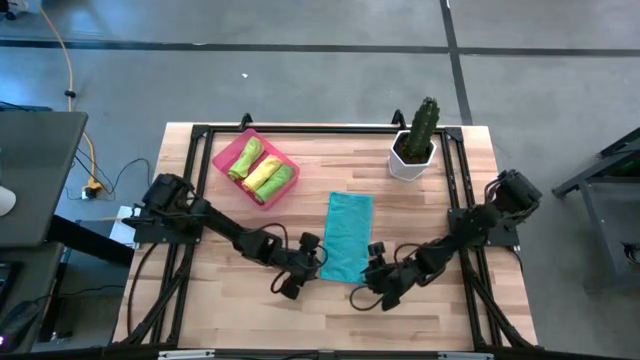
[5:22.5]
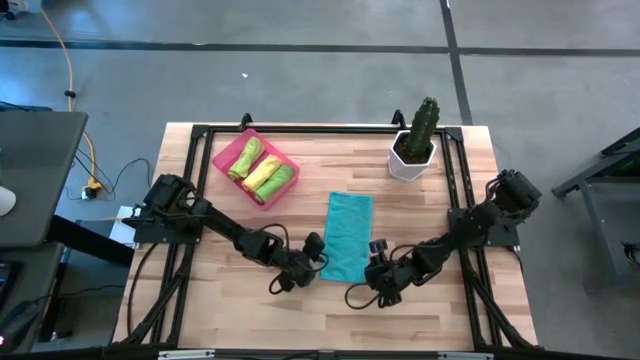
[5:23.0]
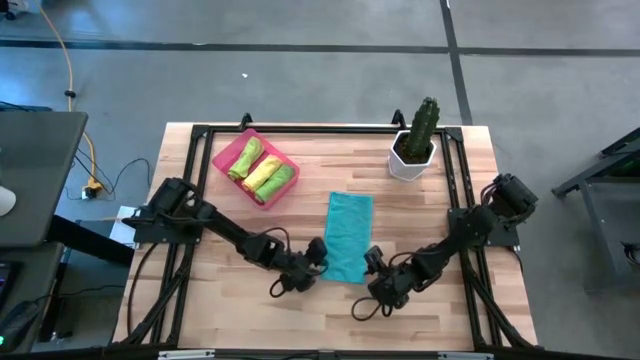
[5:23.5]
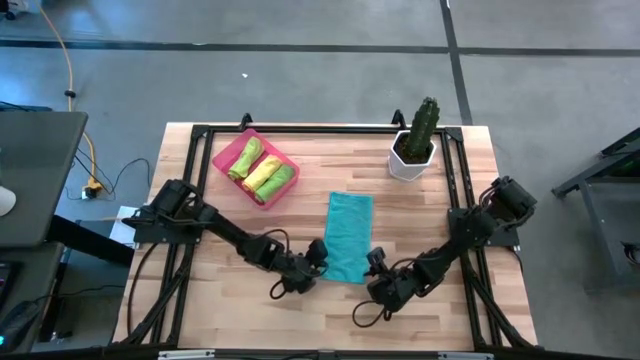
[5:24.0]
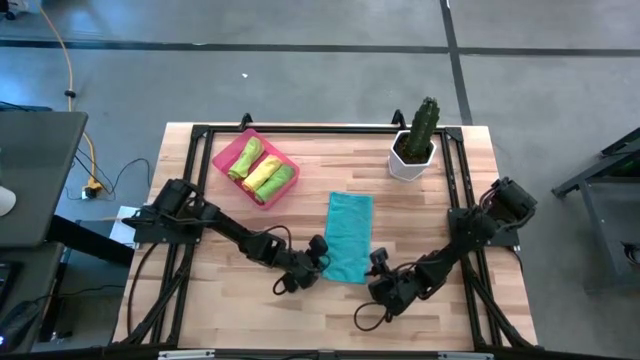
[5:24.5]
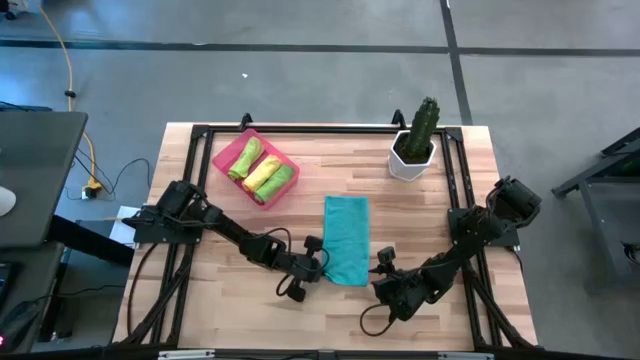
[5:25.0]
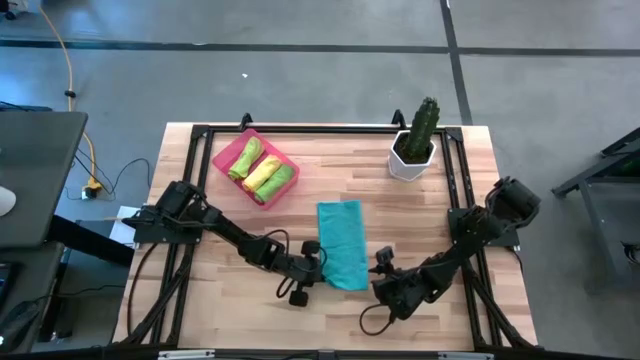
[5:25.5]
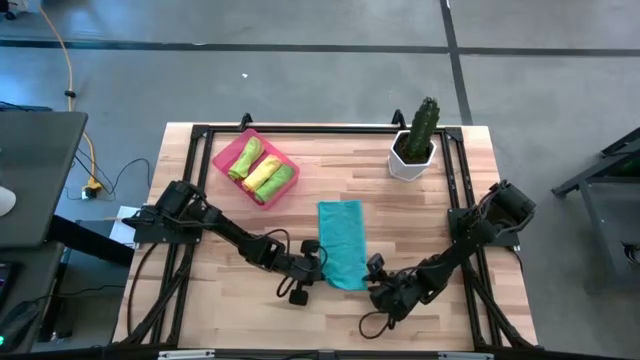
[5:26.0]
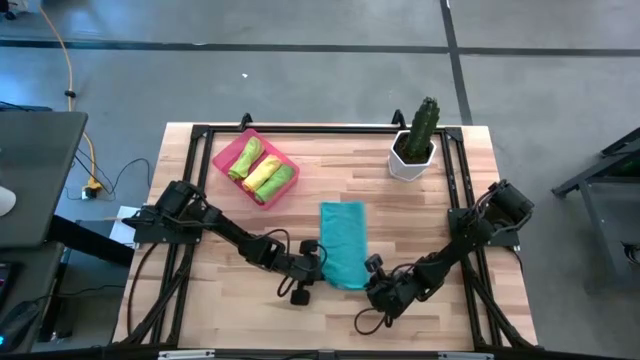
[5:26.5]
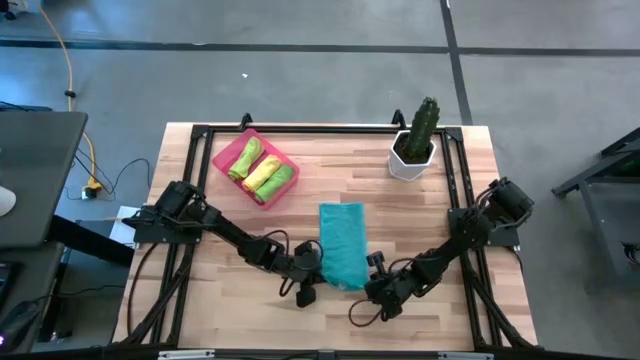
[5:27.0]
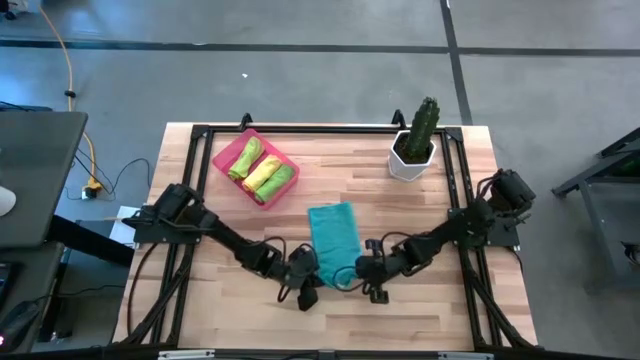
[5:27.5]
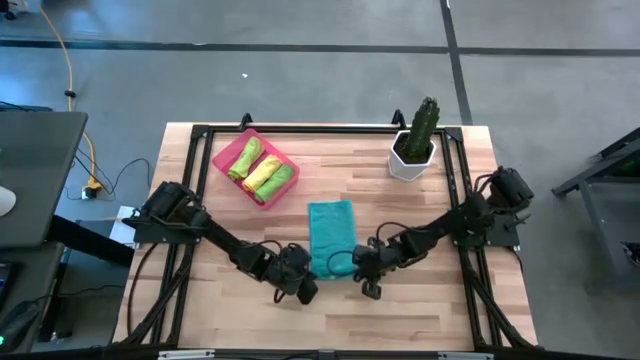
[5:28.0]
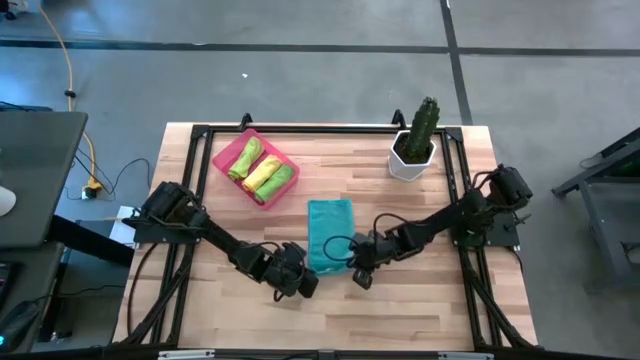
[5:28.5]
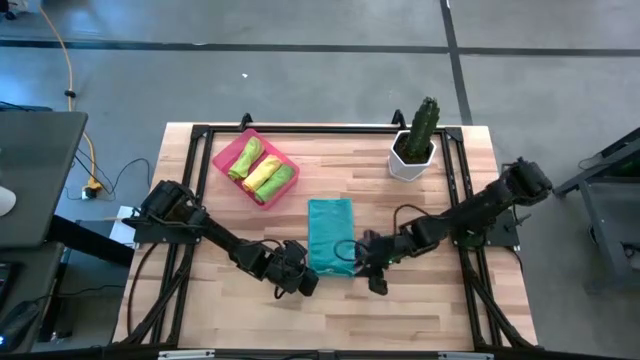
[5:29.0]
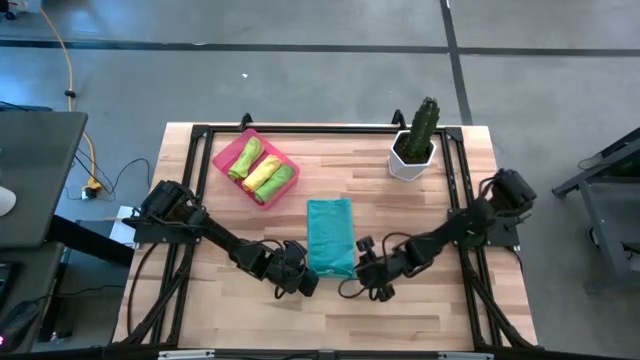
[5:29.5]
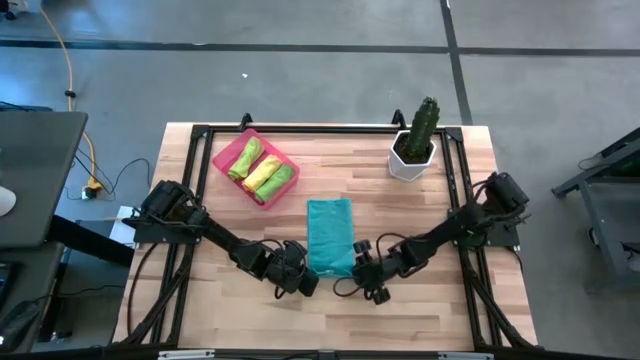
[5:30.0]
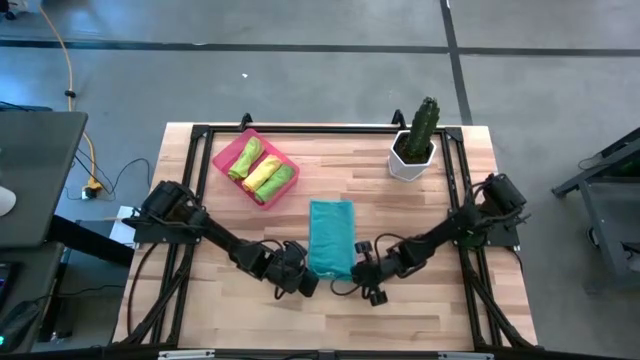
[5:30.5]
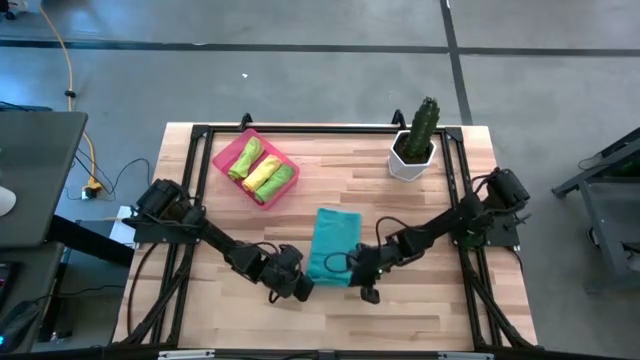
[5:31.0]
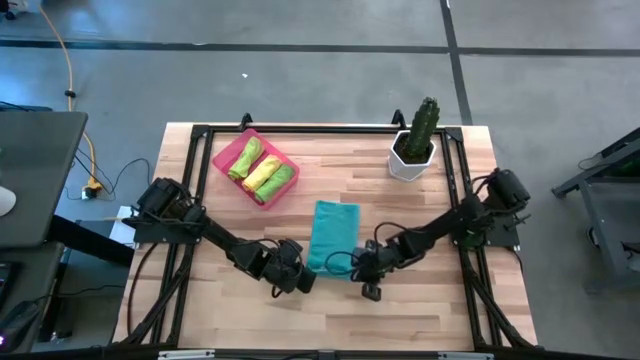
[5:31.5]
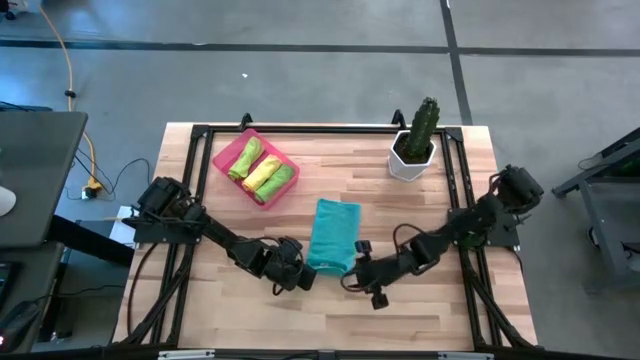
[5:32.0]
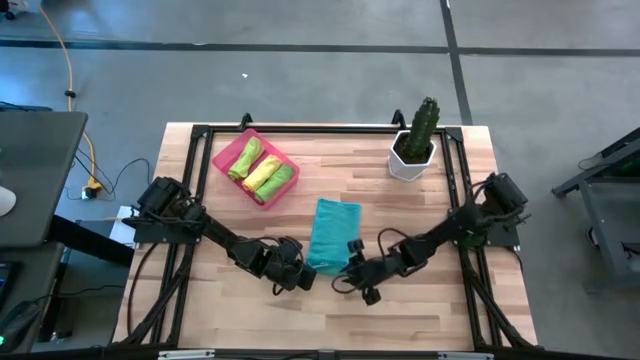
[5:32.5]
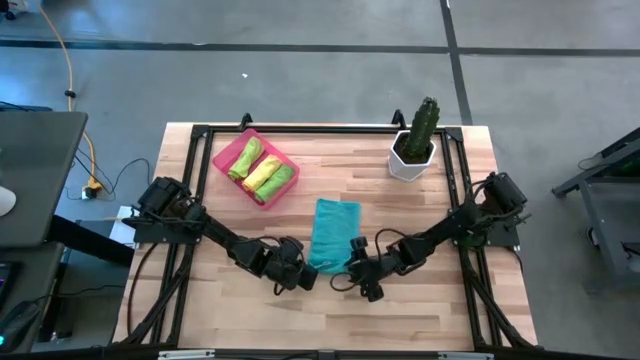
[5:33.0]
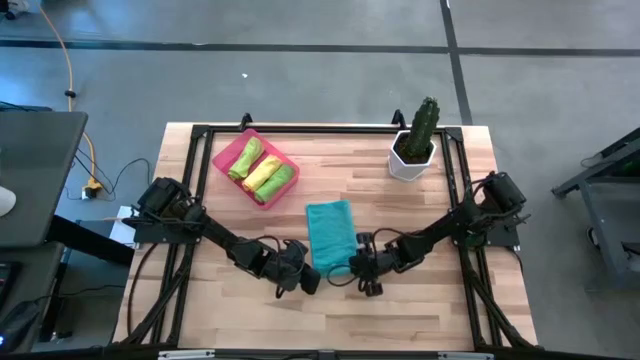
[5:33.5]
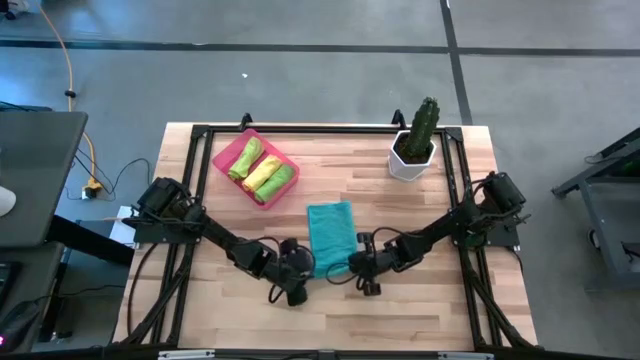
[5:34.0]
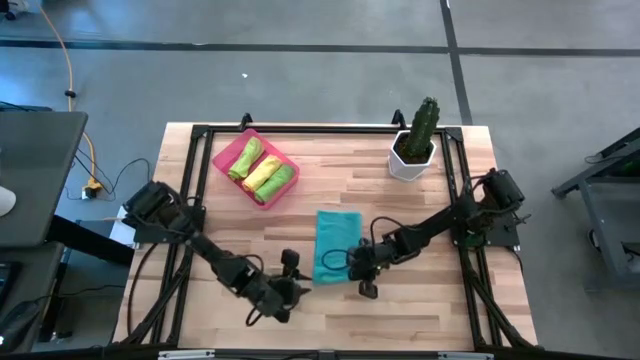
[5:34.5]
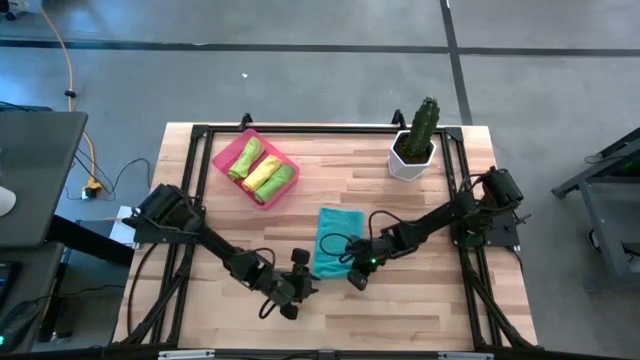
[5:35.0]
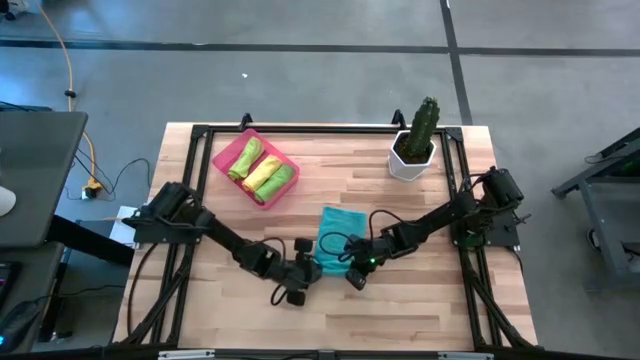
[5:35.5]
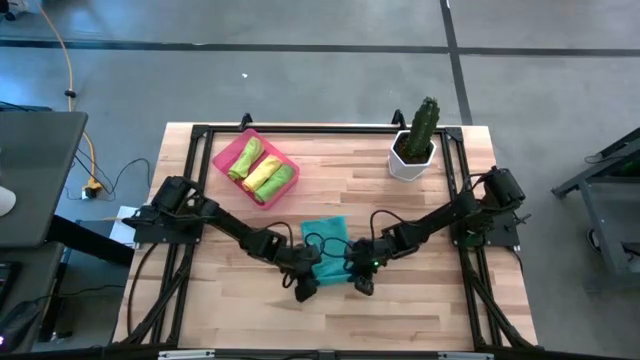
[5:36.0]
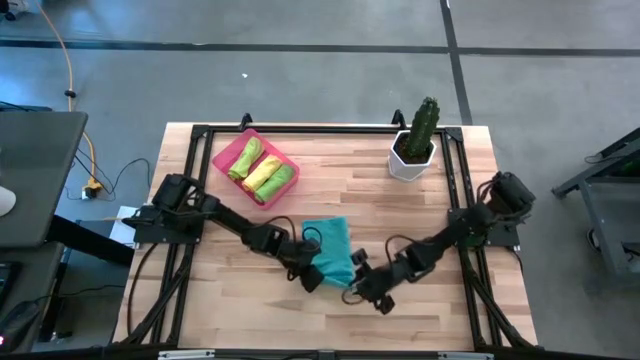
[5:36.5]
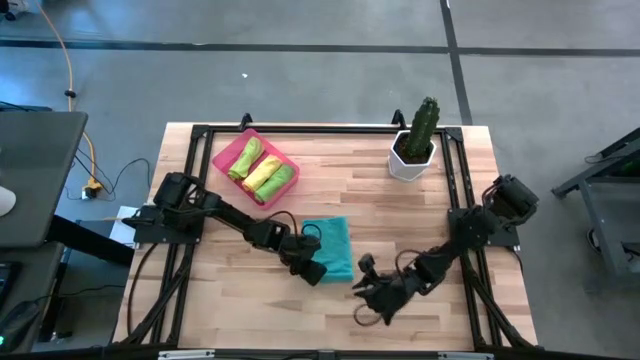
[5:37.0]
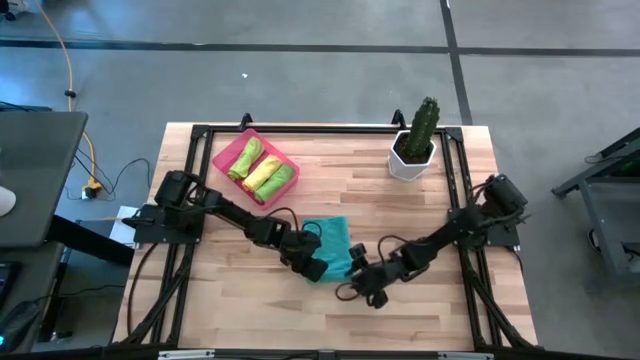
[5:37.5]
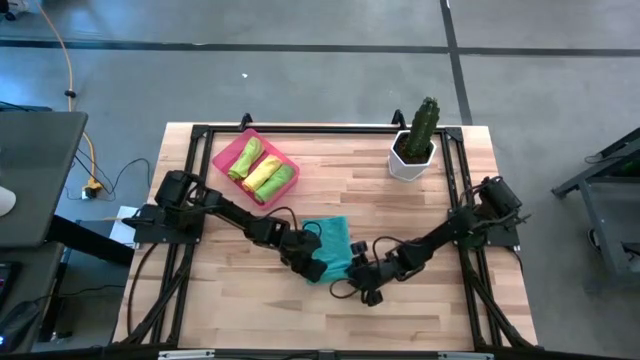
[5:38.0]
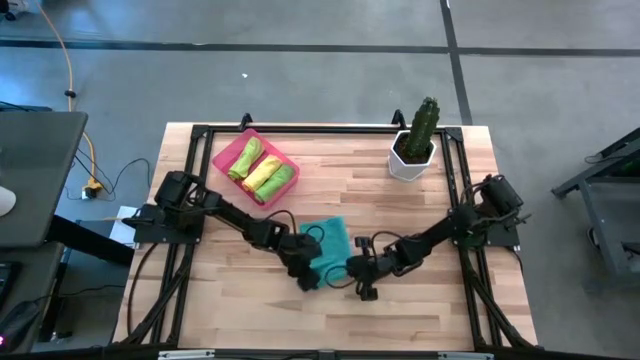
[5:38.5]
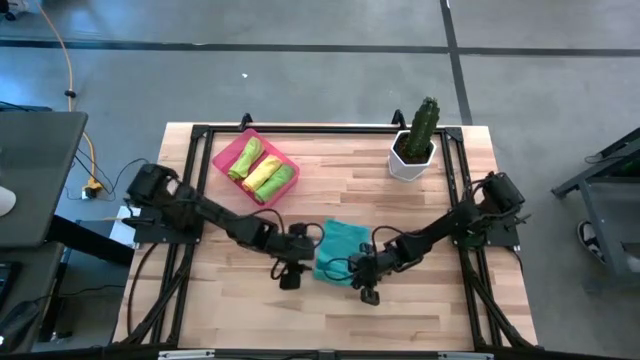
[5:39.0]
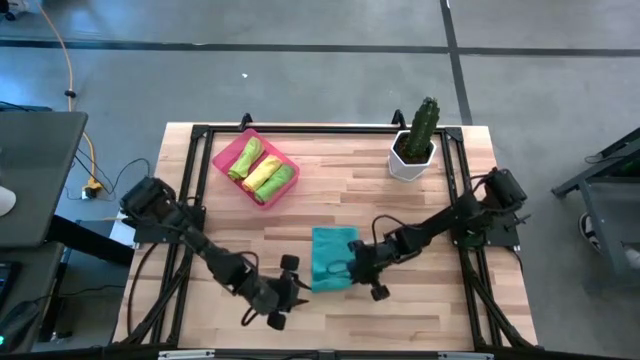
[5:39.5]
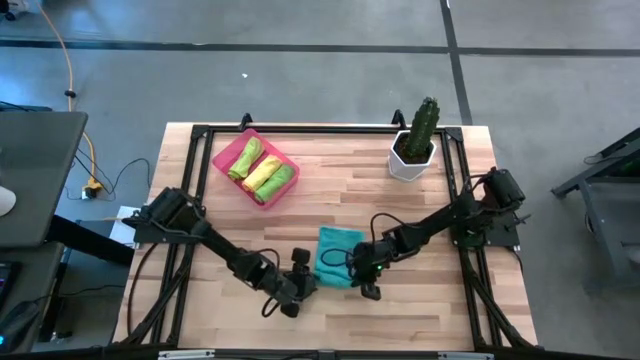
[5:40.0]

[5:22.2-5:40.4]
Task: Roll microfiber towels into tight, uniform cylinder then place into a basket
Roll the blue microfiber cloth

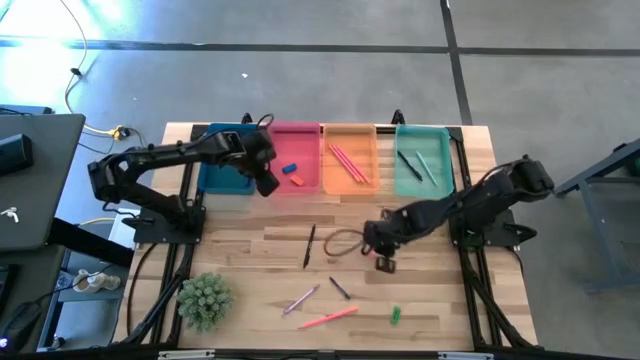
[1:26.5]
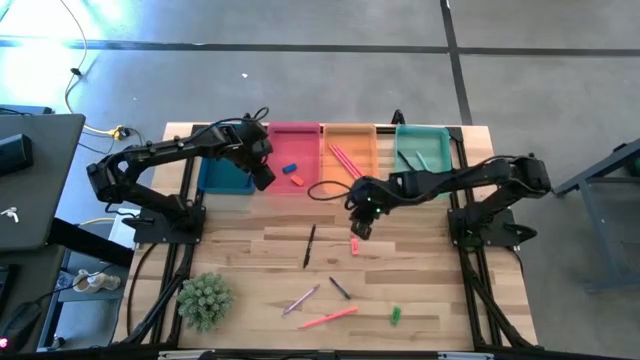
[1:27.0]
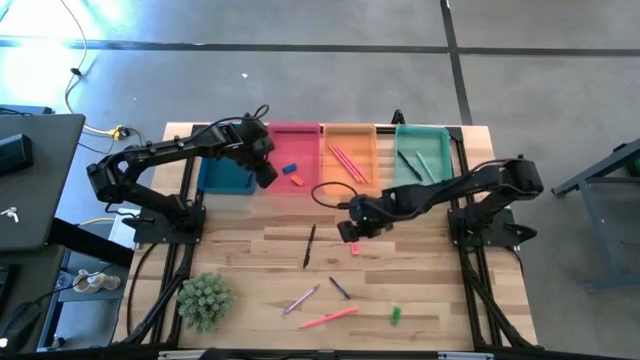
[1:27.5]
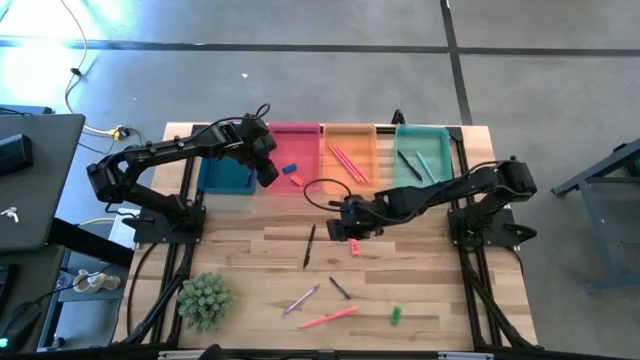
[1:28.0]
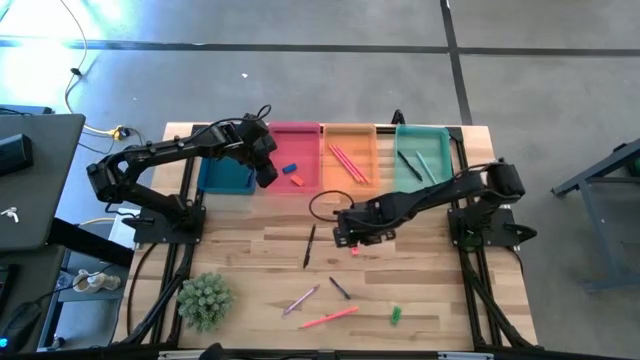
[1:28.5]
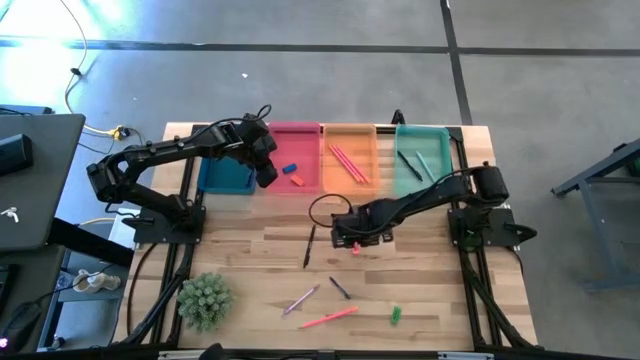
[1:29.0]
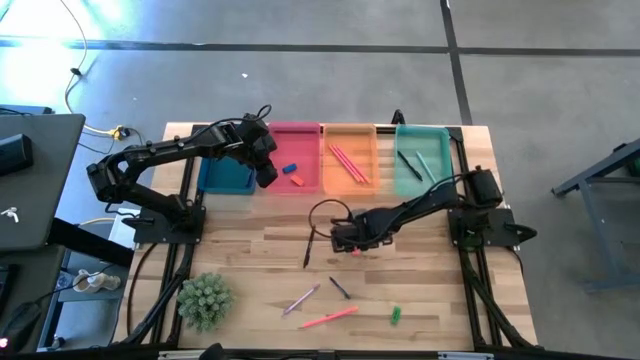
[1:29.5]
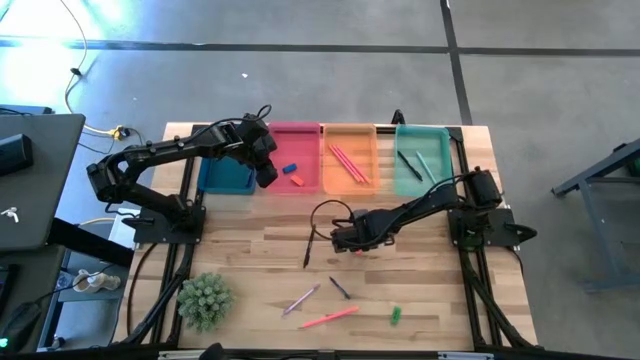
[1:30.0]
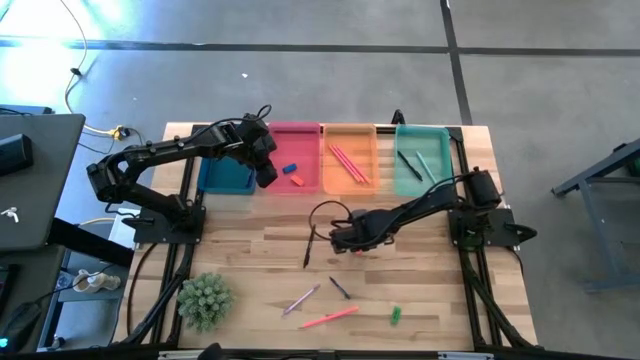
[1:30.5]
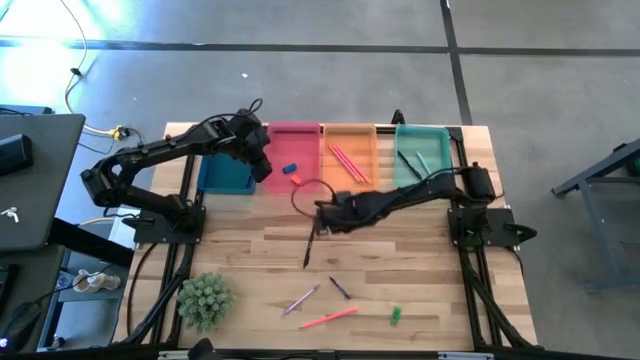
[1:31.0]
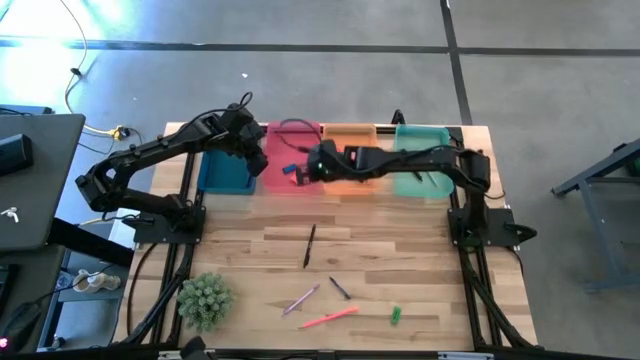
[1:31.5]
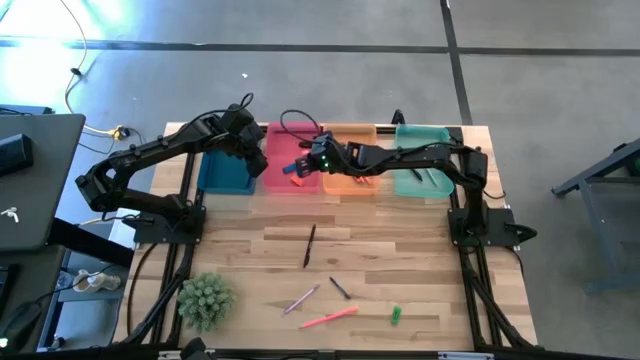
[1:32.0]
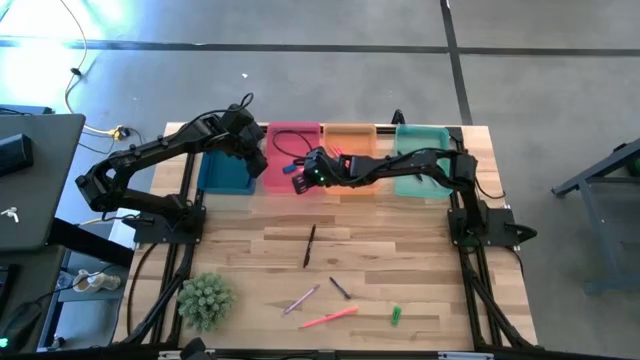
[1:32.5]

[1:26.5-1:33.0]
Task: Sort crayons/erasers/pens/pencils in bins
Put the pink eraser into the pink bin
